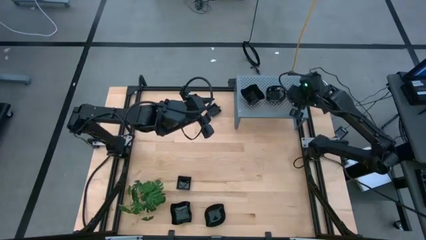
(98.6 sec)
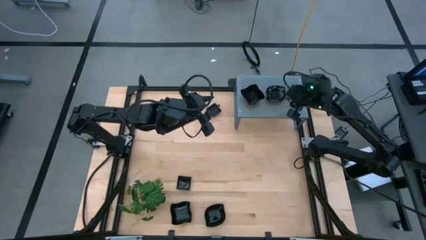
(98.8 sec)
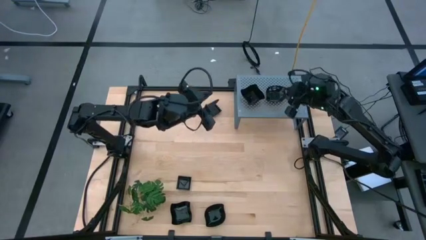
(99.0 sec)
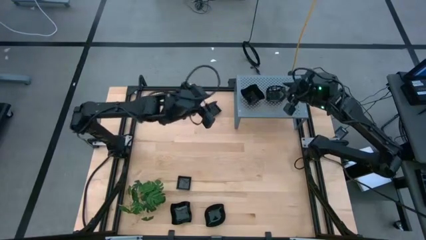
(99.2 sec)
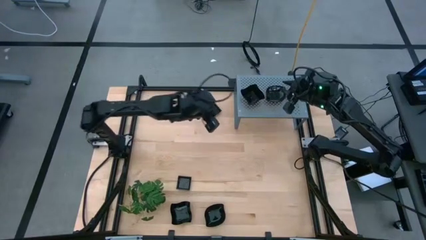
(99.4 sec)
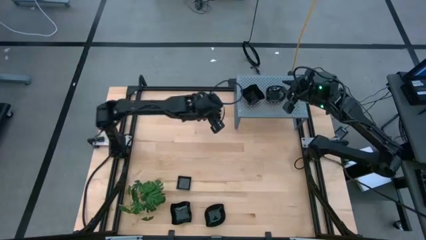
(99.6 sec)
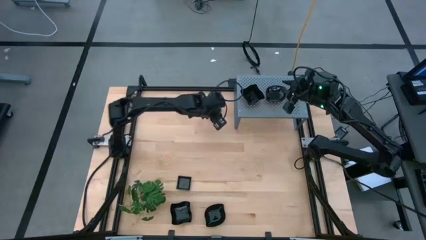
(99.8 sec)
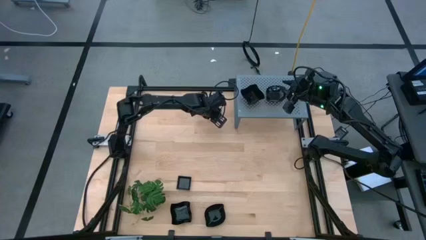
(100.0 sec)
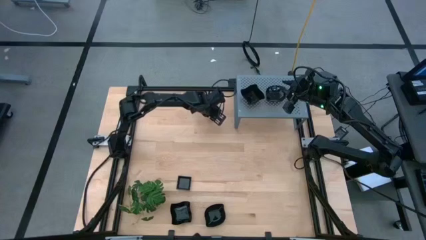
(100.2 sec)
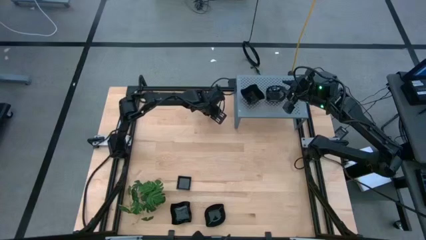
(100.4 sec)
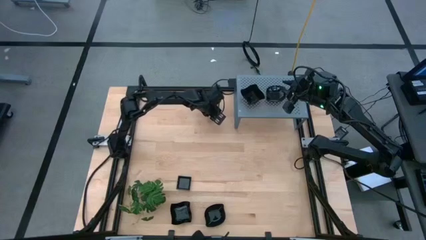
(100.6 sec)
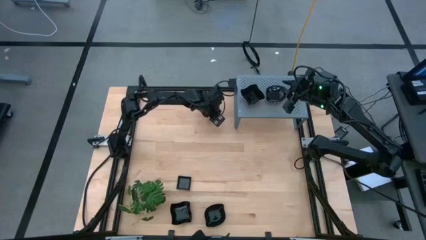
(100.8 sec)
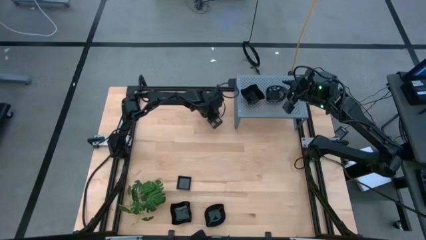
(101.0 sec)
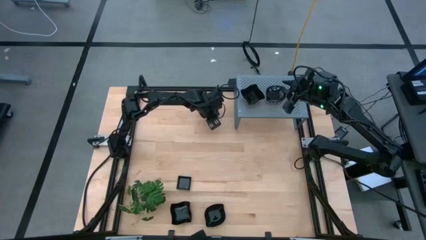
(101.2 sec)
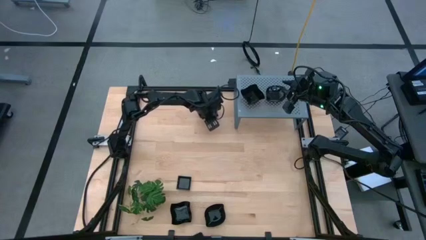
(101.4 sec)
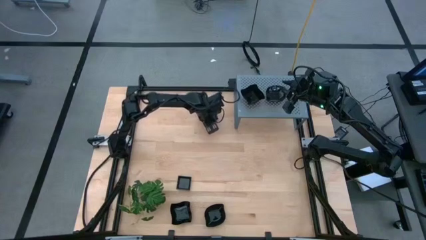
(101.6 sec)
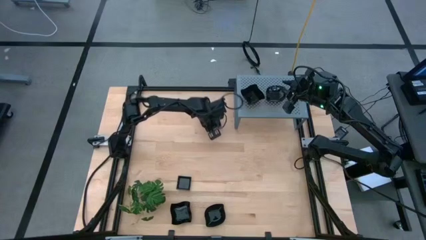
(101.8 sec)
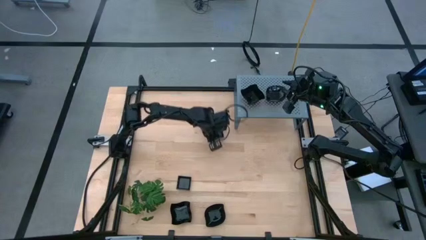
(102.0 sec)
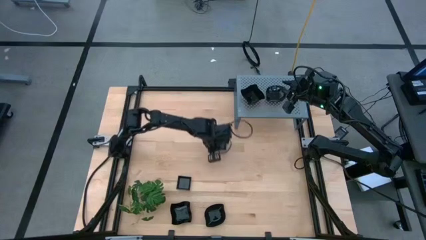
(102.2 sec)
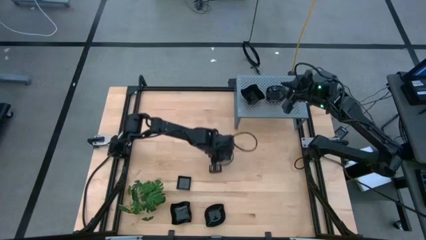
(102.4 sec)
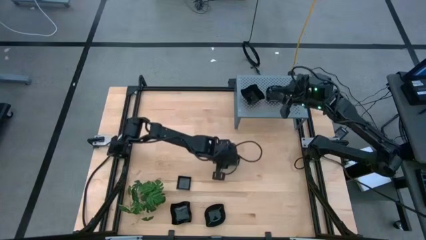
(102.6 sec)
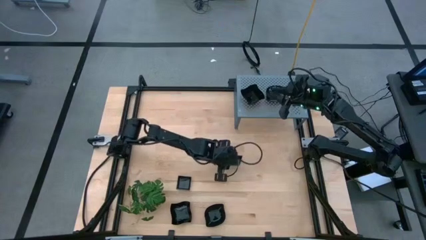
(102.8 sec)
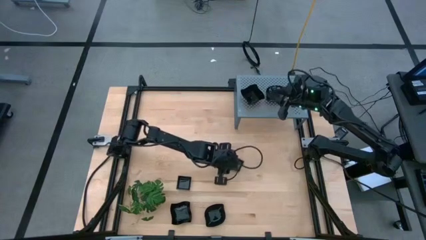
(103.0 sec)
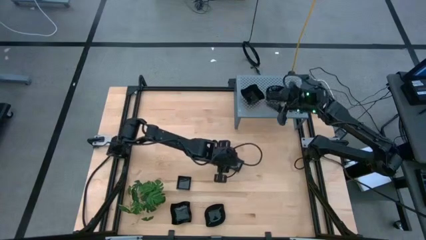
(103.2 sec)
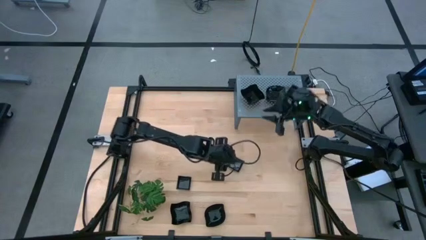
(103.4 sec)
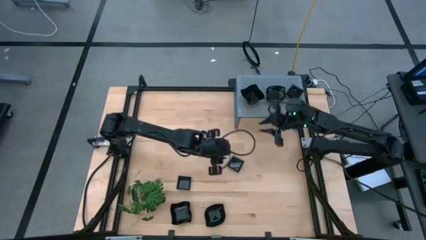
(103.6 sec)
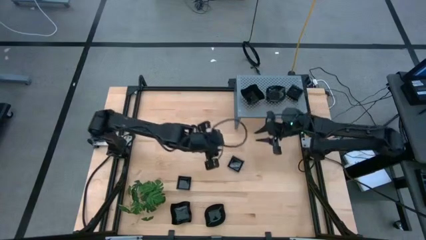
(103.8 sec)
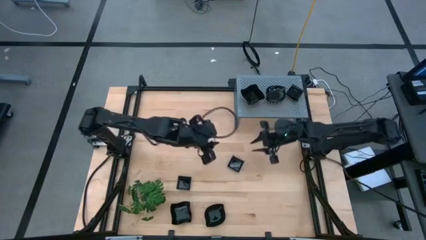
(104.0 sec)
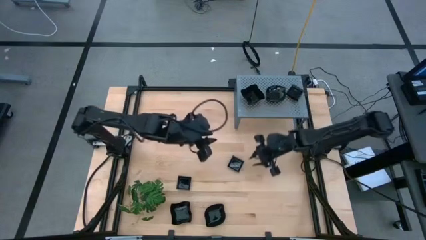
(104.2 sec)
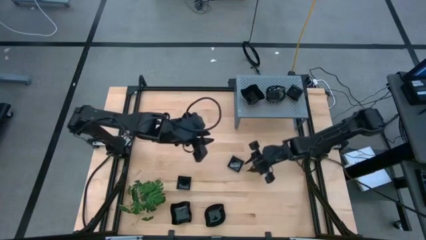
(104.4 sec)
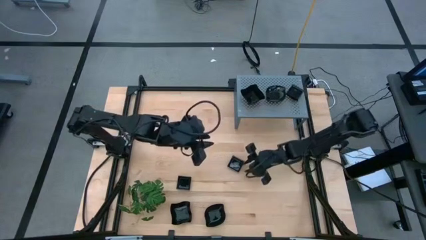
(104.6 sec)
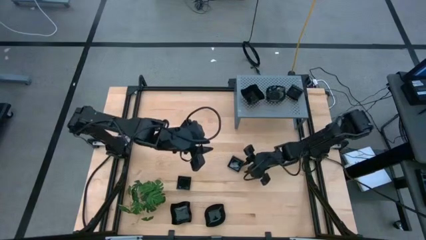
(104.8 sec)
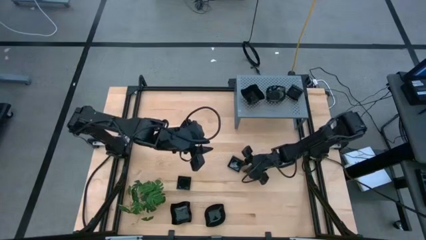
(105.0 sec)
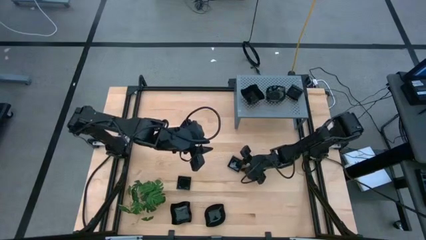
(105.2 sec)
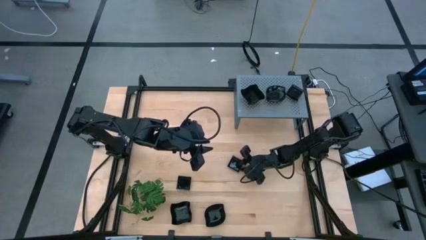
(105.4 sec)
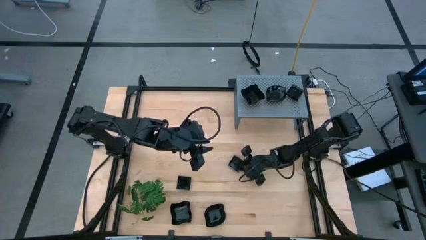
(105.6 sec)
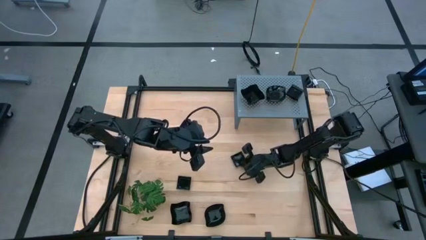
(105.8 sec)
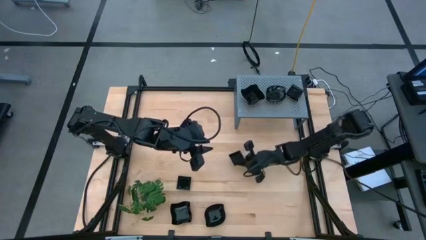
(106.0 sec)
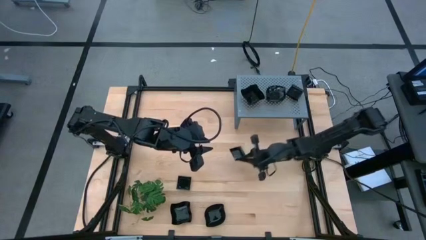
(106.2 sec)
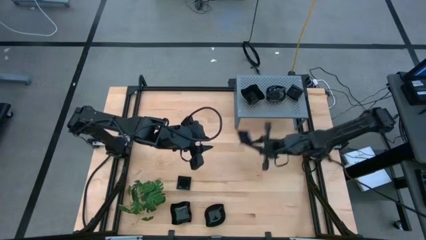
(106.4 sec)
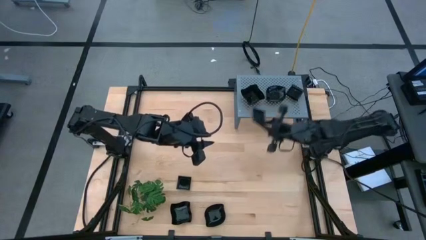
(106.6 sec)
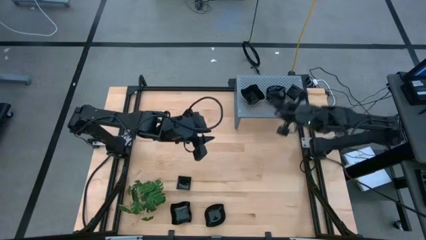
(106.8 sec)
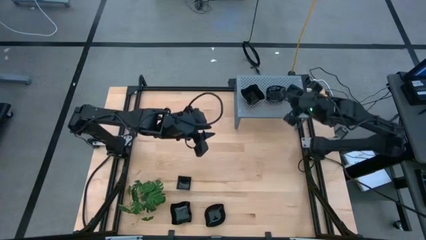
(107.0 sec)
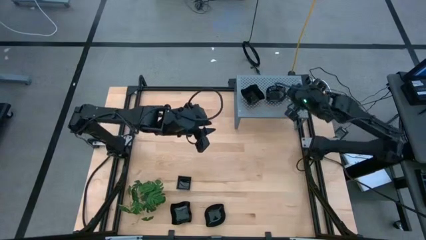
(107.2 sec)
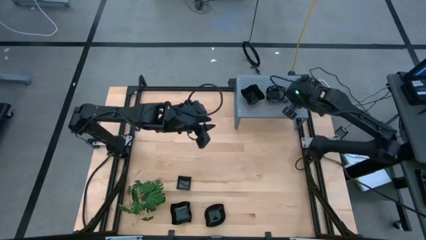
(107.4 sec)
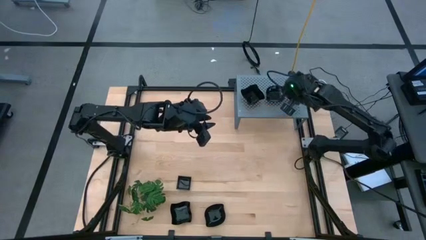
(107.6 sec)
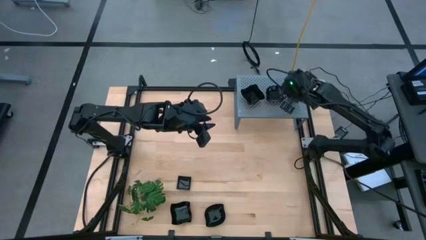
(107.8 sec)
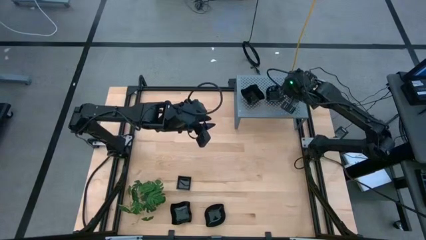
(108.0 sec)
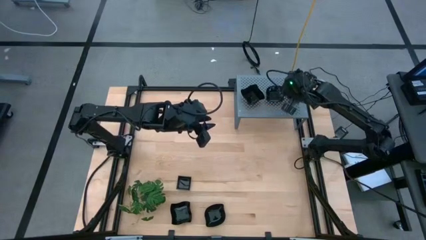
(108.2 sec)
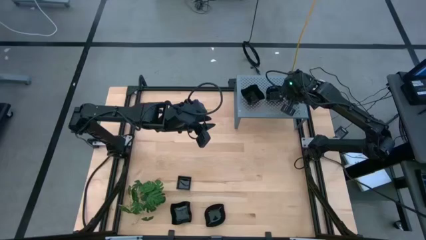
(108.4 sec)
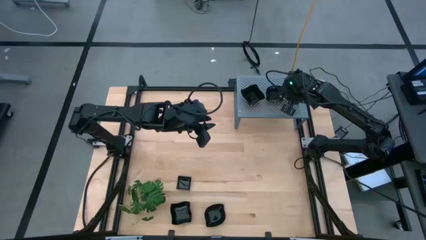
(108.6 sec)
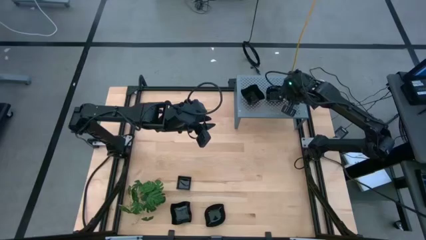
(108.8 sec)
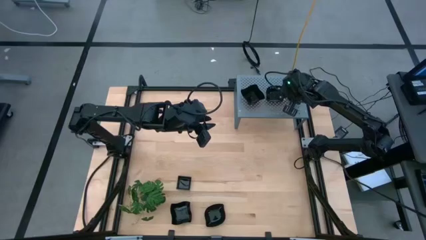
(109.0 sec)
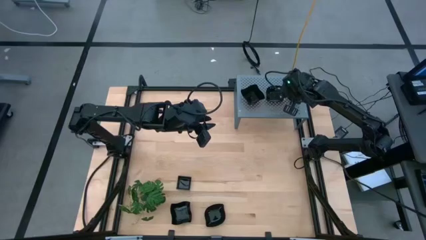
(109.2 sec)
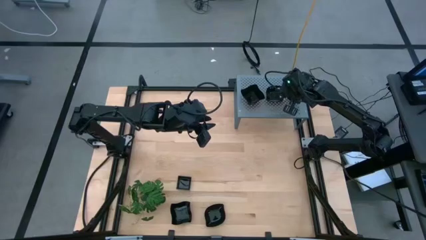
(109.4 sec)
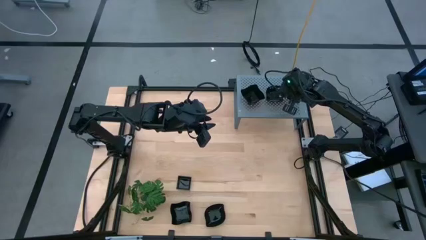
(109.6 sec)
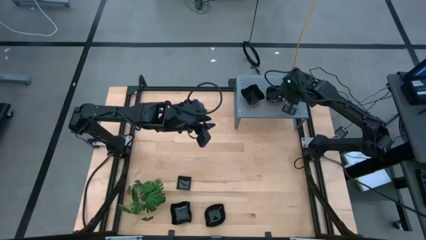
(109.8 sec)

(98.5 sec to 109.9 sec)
Task: Pick & Place Mini shaped plates
Stack the black square plate on top of the black square plate on the shelf

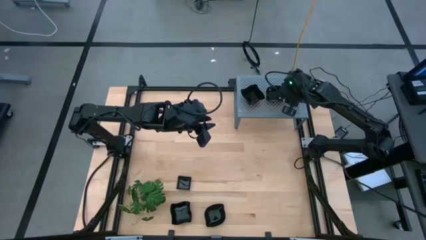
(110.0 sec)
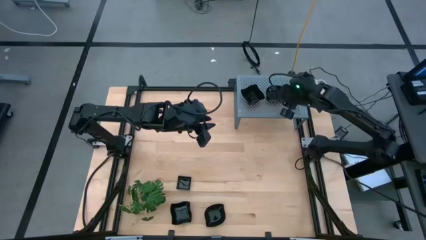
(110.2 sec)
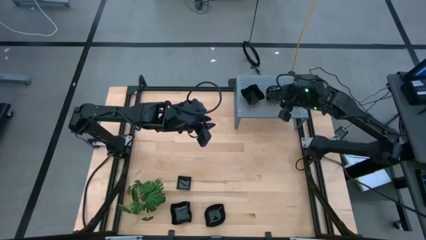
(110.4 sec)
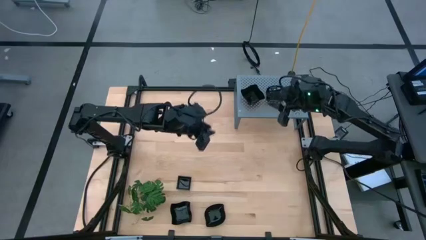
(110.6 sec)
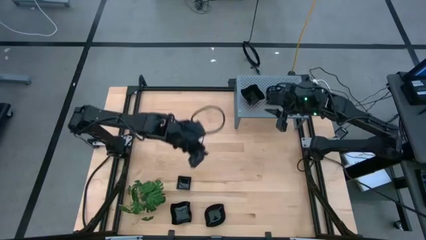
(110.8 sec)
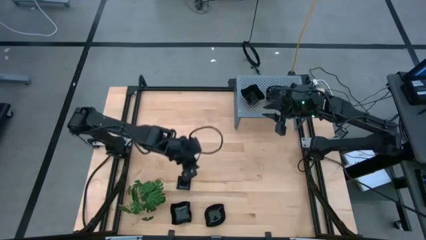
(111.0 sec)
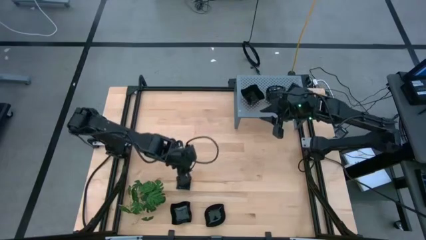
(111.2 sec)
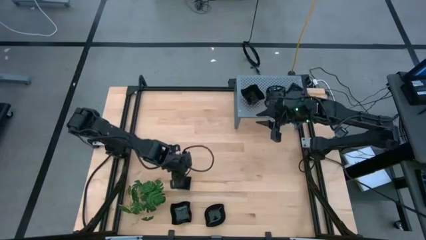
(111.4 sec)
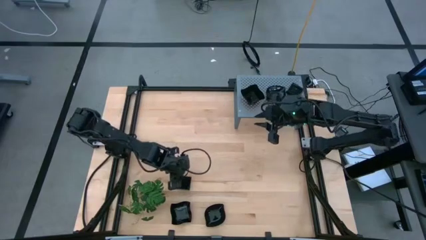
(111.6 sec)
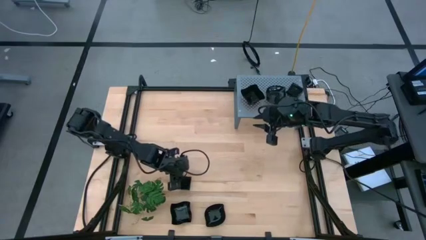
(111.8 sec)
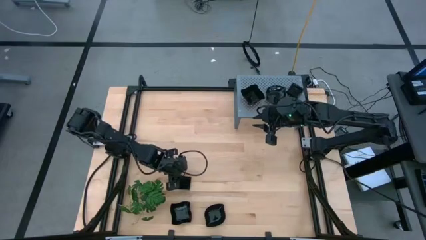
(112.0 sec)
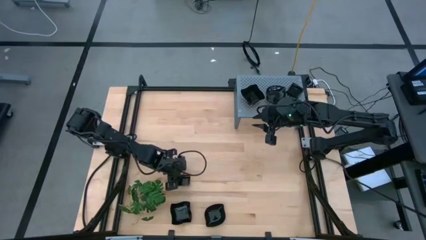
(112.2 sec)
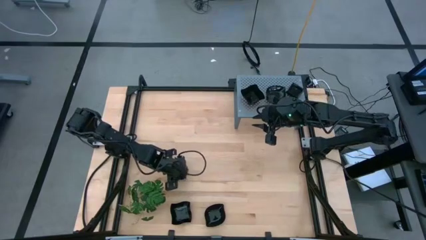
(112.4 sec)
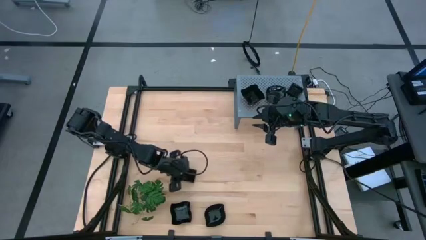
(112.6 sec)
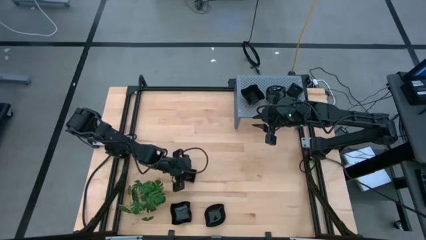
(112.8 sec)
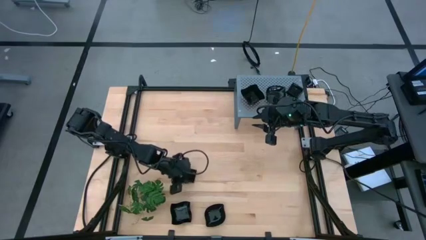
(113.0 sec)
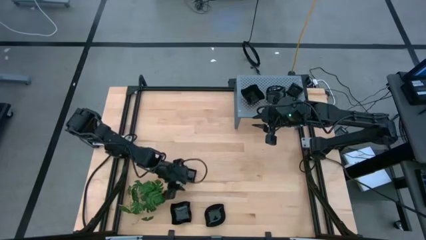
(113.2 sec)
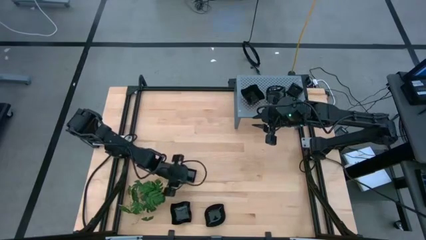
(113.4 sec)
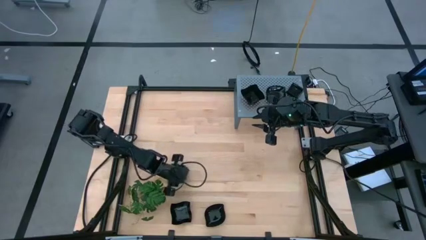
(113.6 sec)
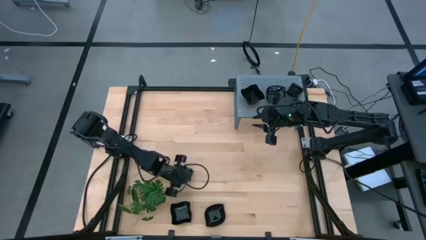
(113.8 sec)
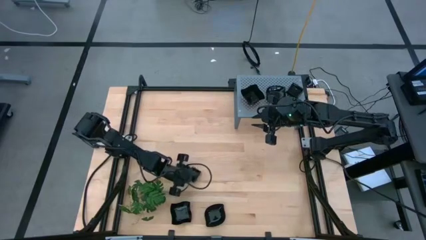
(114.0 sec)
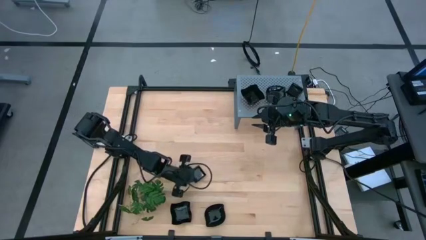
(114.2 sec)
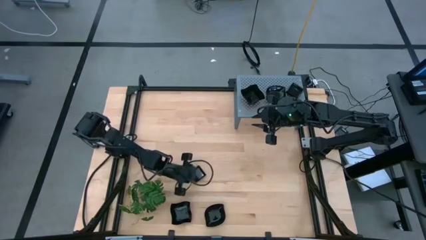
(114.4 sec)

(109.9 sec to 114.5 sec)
Stack the black square plate on top of the black square plate on the shelf
